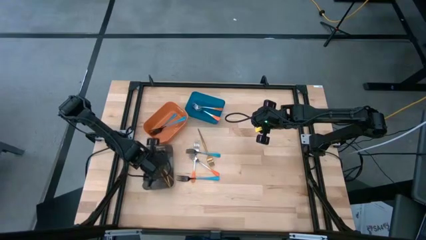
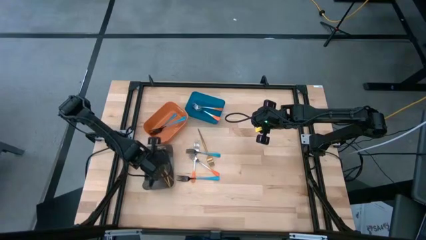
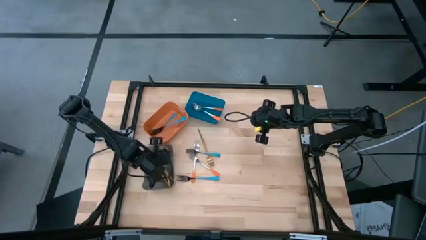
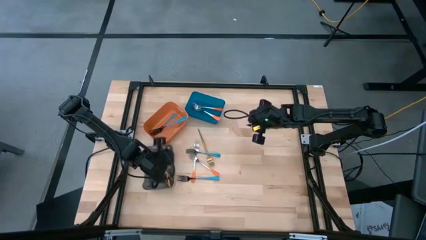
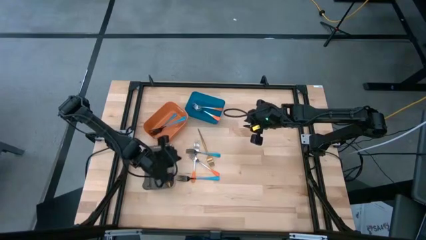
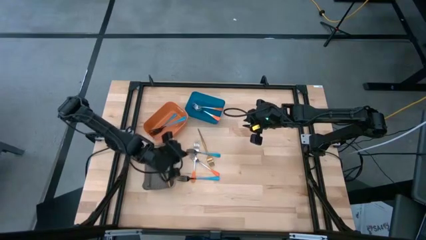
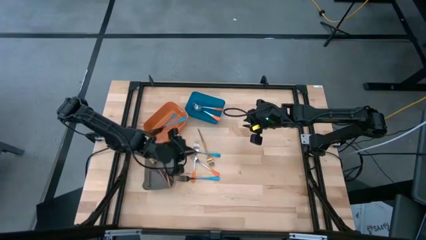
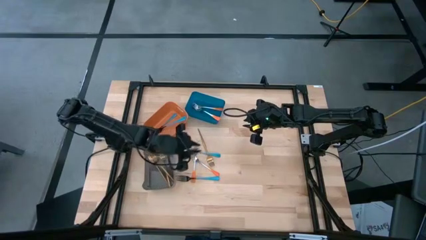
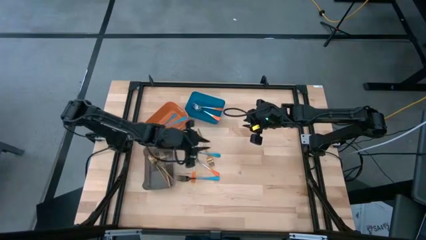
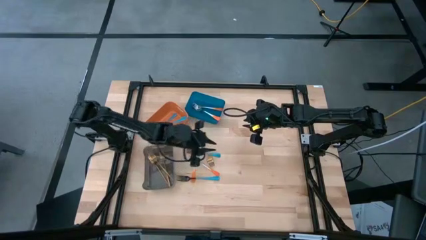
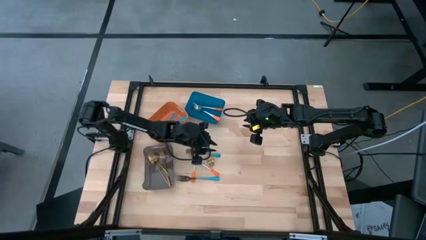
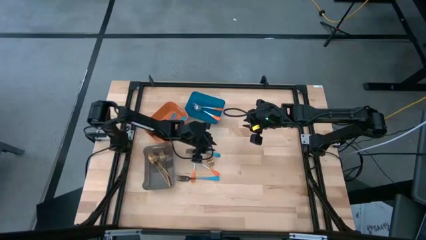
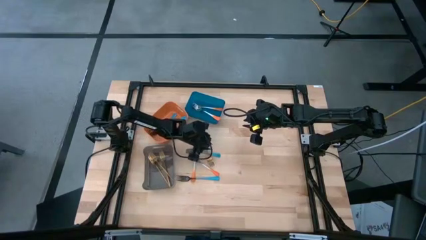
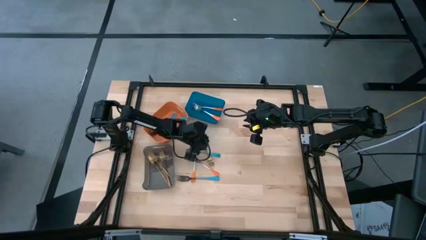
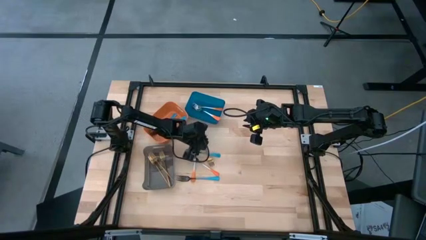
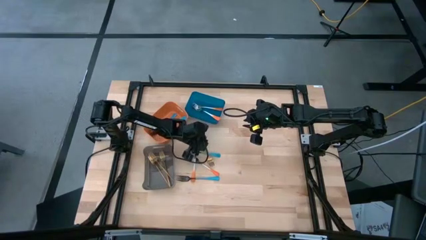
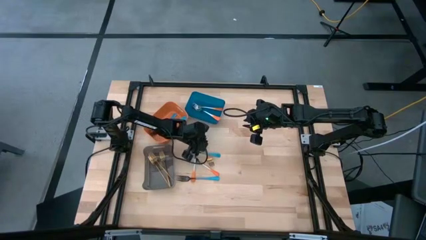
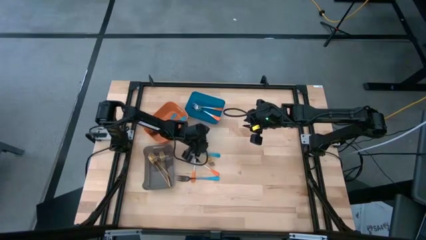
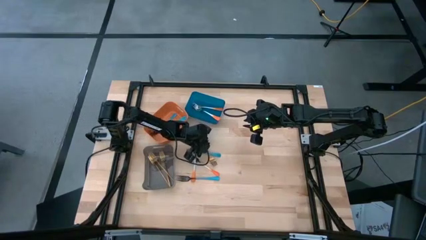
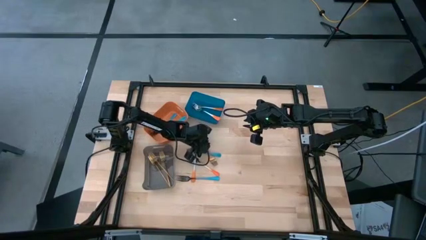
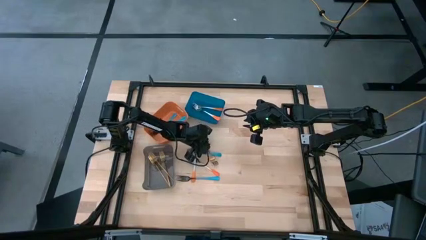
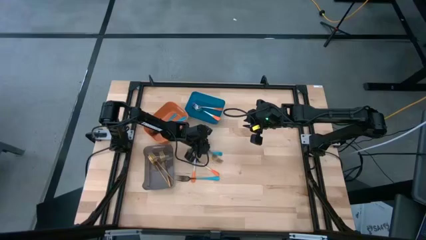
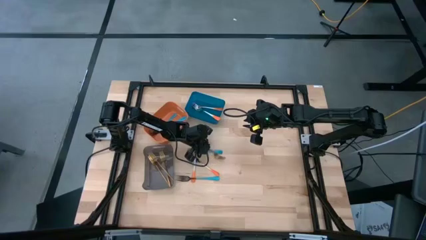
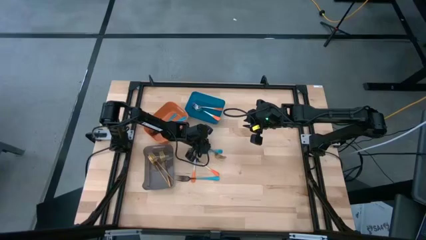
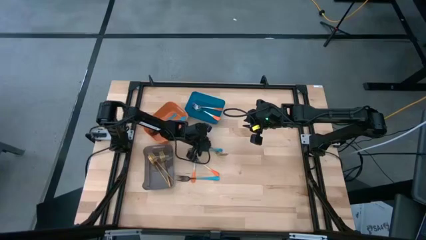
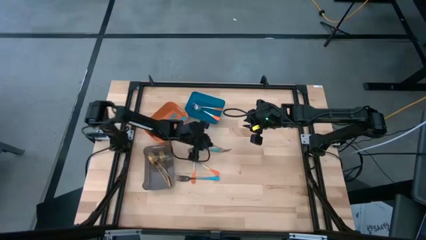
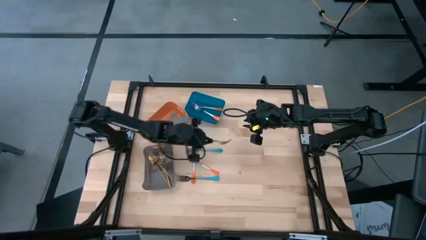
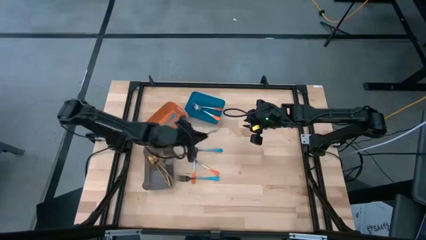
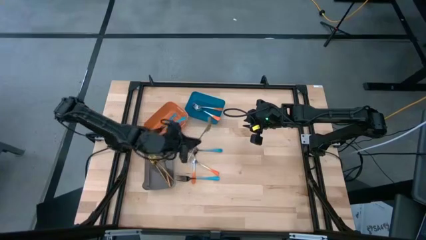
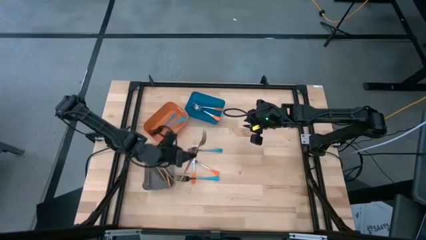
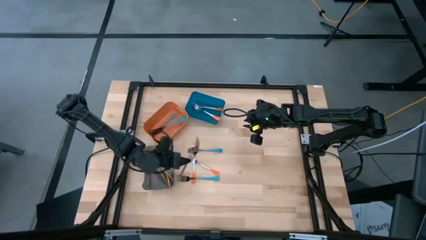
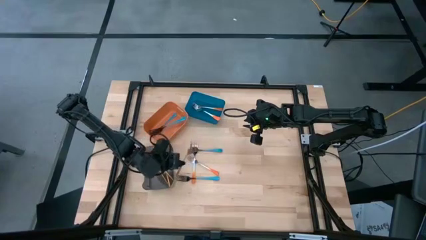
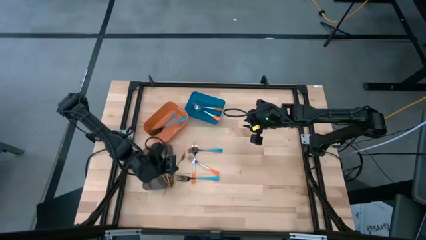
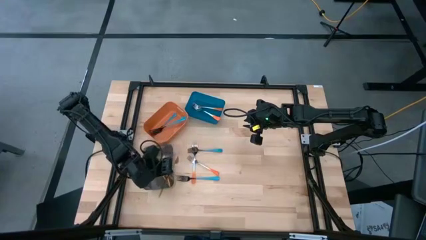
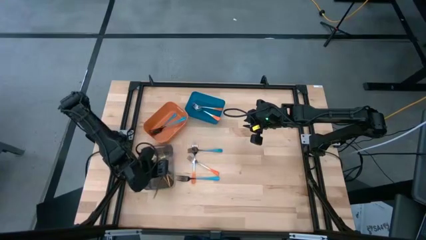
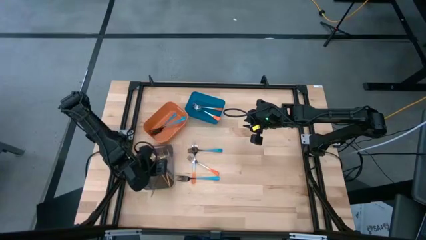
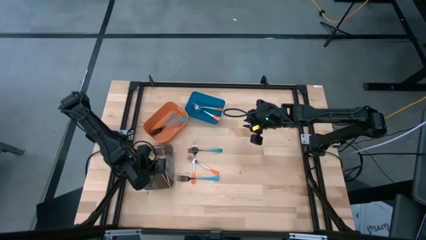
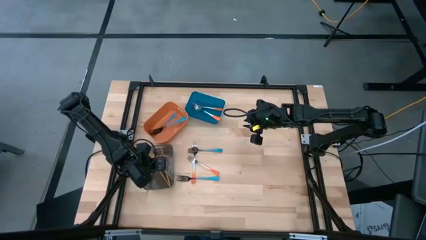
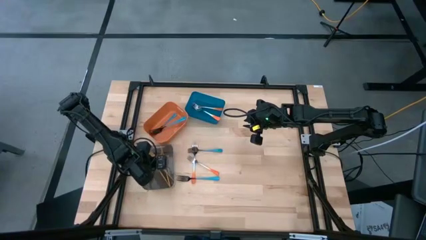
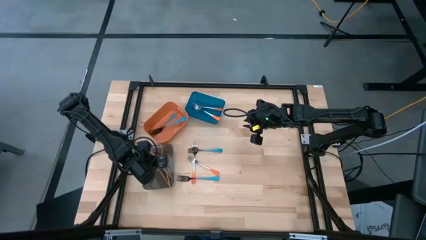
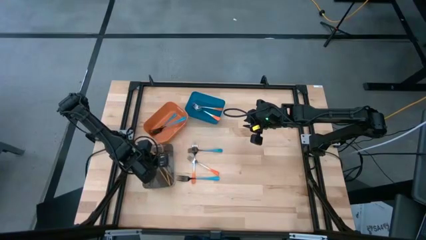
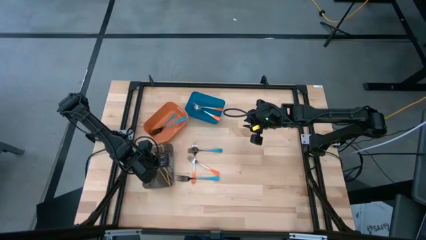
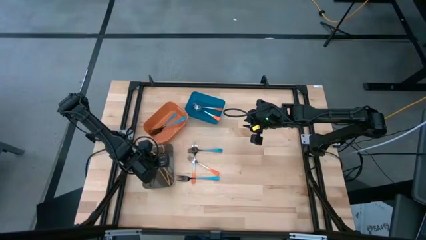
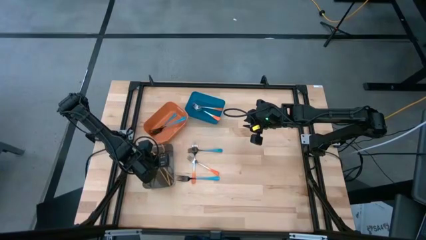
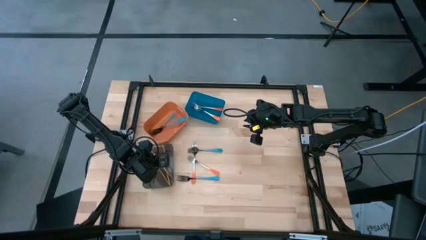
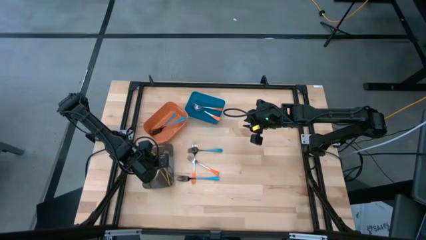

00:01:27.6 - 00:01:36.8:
Task: Sort silverware by color (type)
Put the gold fork into the black bin

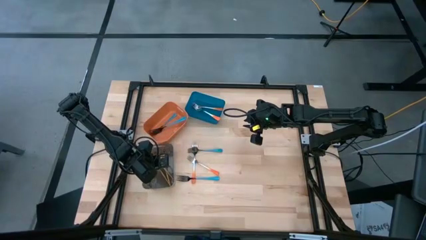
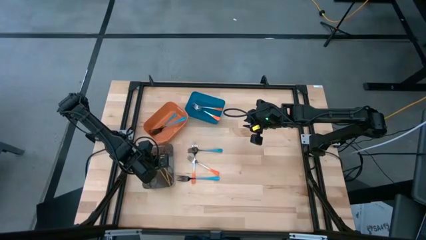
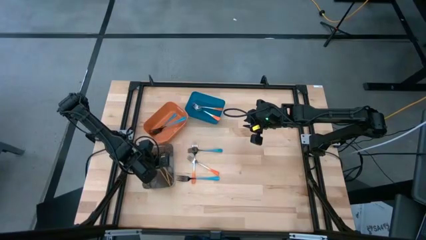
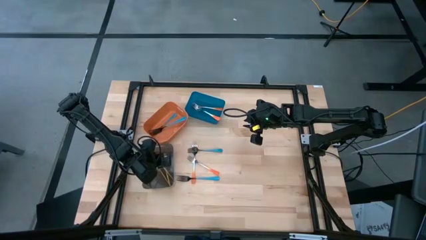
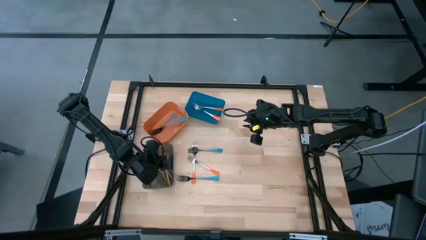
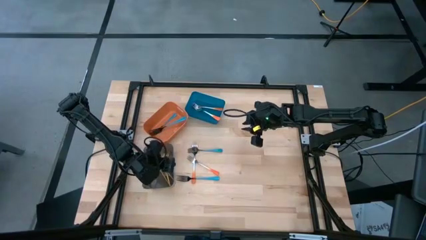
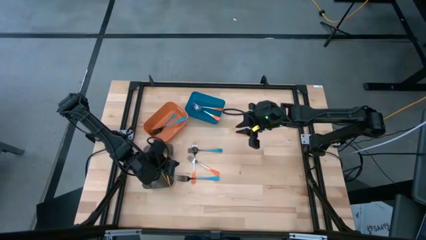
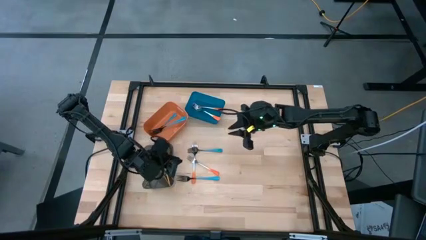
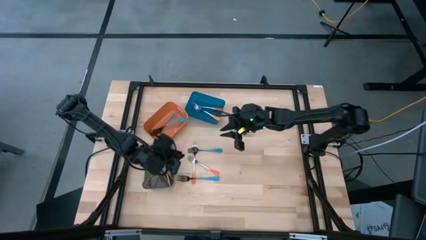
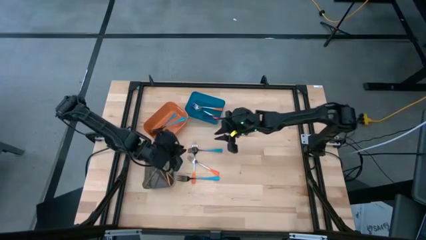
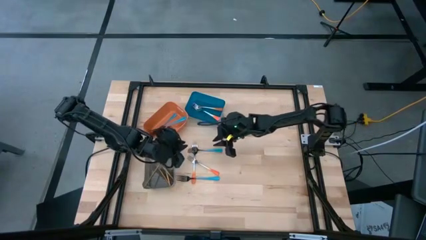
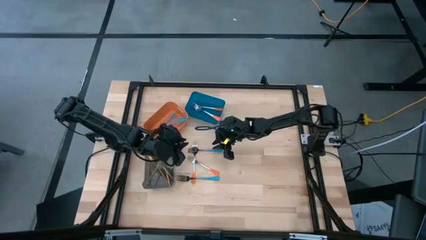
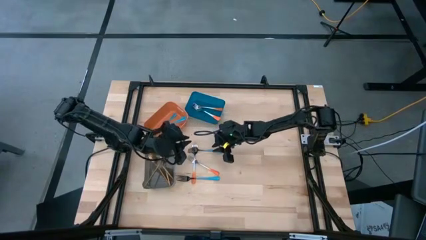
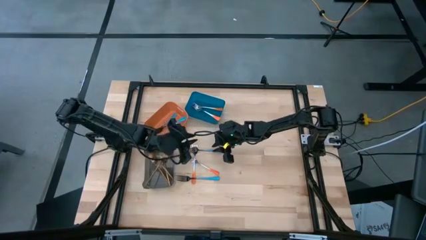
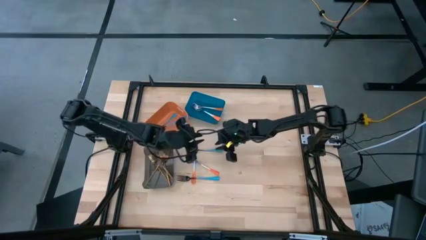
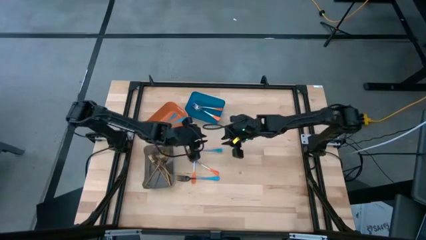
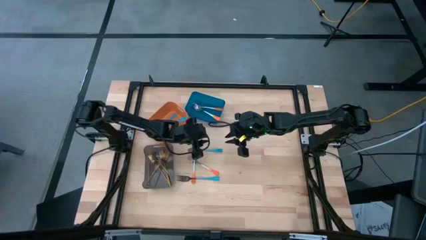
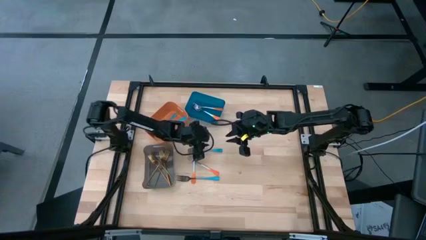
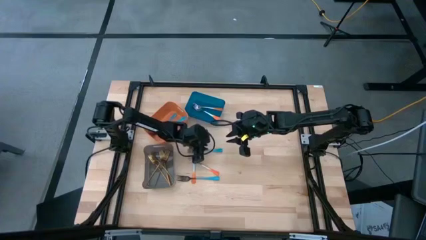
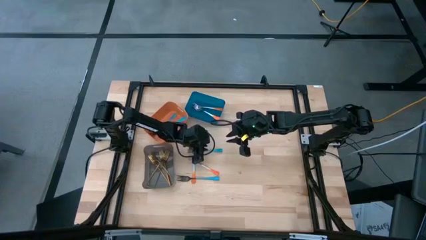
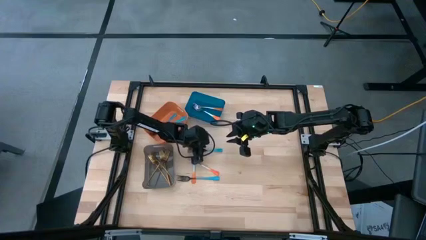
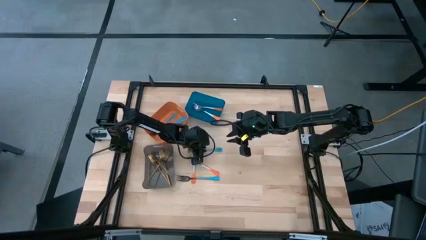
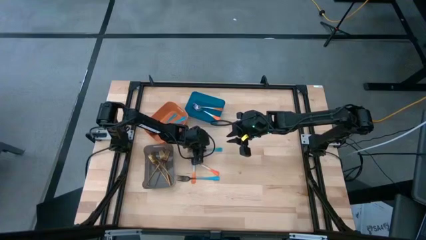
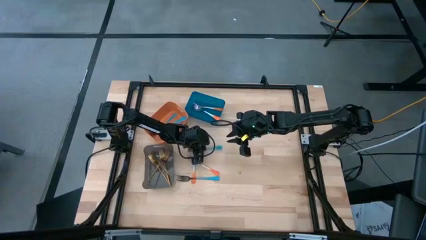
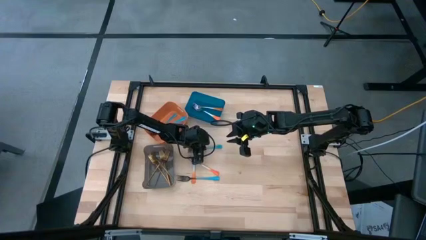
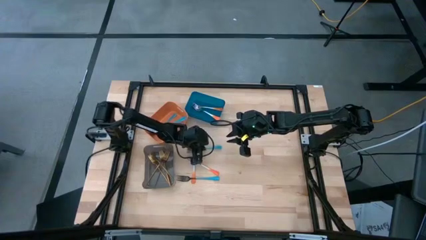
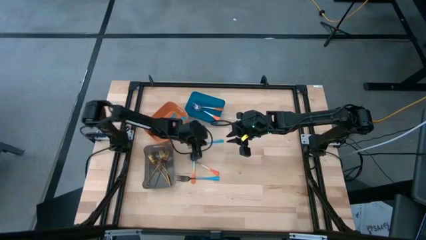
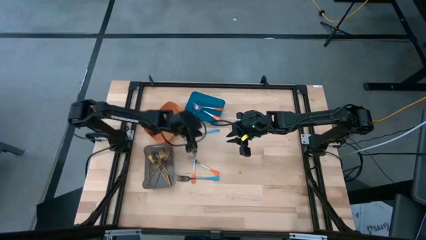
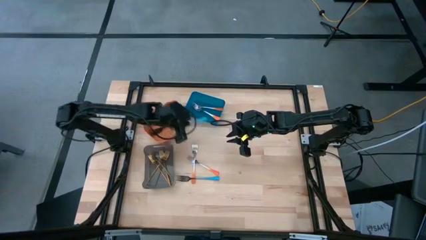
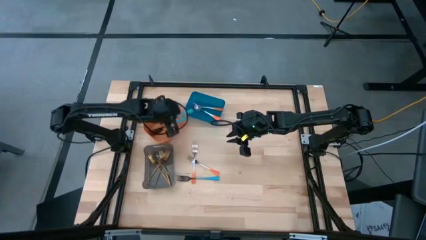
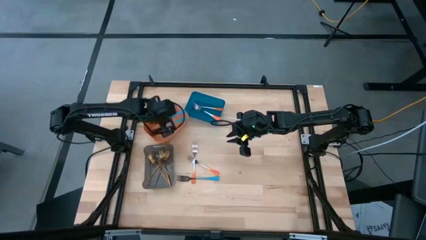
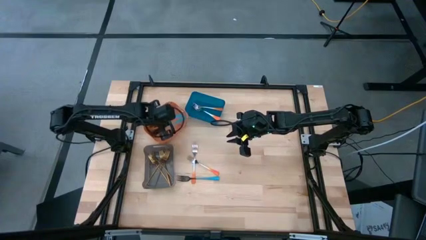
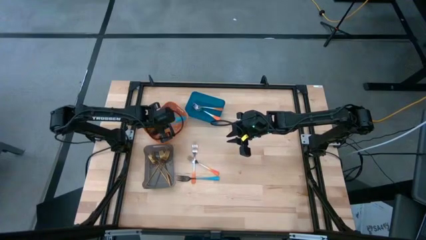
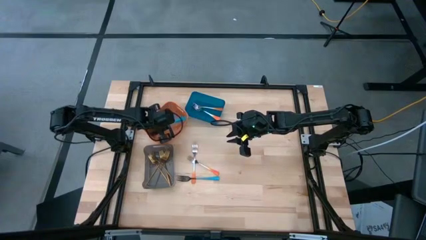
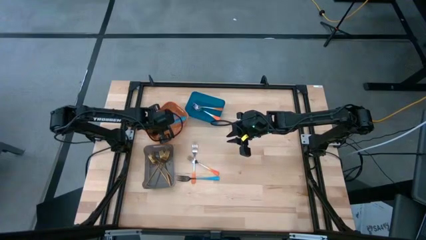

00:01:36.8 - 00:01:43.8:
Put the blue fork into the orange bin
